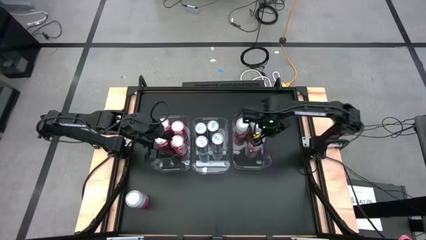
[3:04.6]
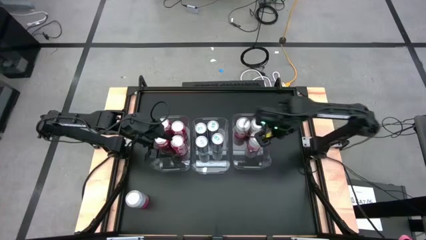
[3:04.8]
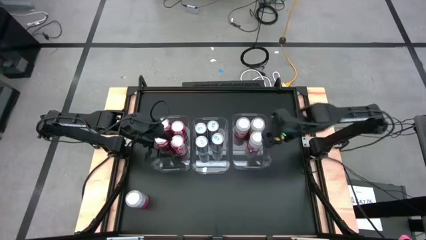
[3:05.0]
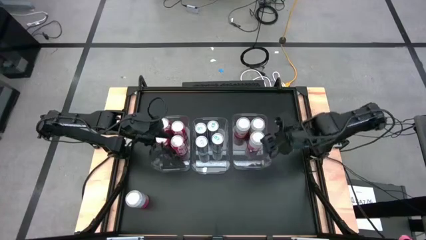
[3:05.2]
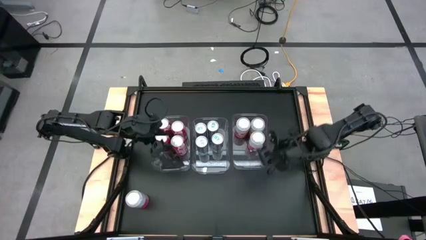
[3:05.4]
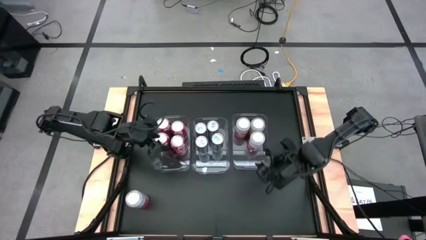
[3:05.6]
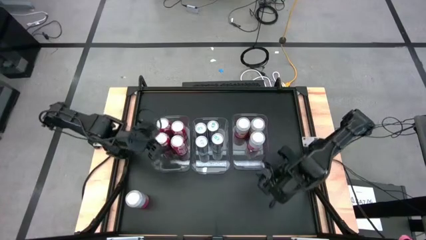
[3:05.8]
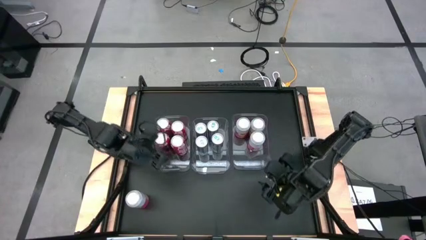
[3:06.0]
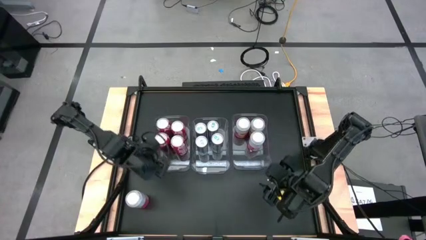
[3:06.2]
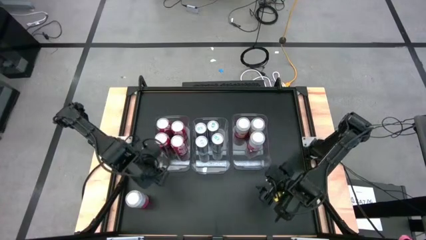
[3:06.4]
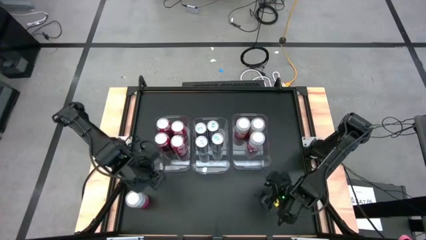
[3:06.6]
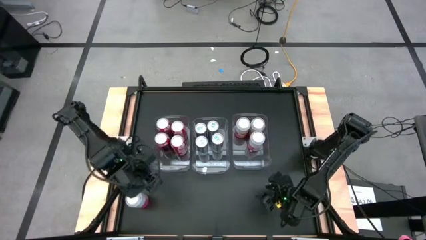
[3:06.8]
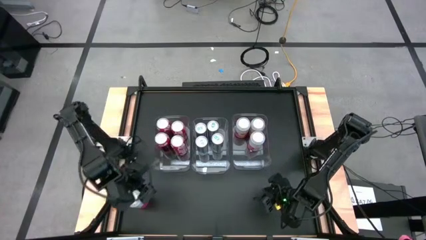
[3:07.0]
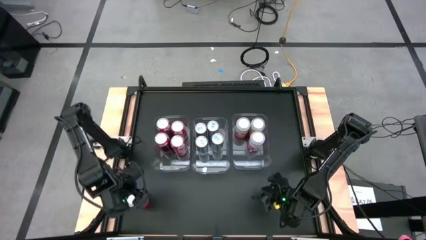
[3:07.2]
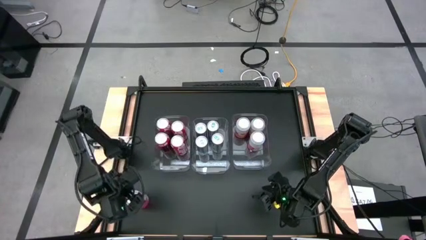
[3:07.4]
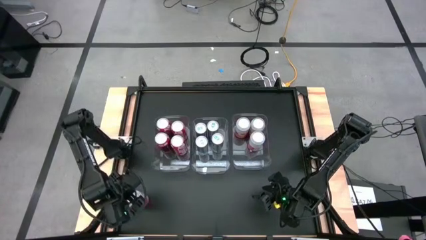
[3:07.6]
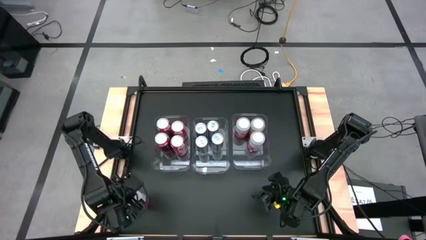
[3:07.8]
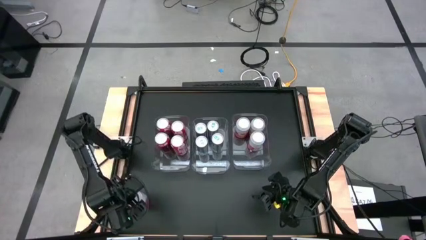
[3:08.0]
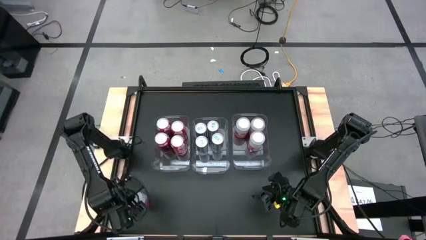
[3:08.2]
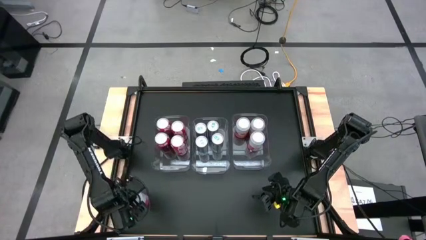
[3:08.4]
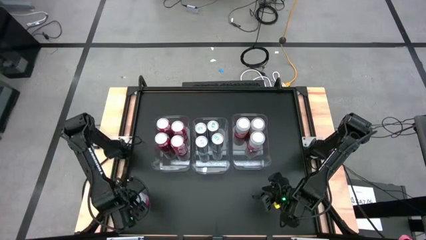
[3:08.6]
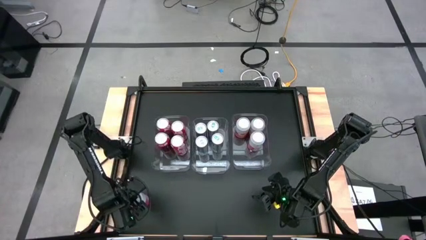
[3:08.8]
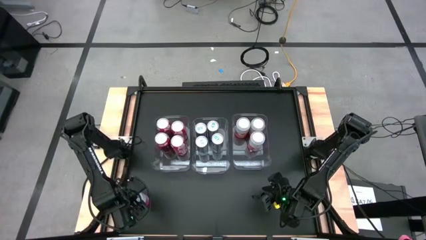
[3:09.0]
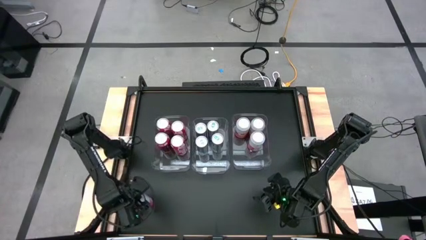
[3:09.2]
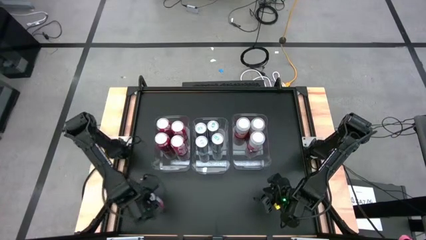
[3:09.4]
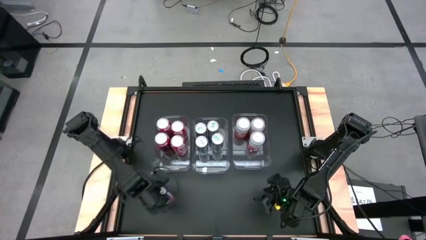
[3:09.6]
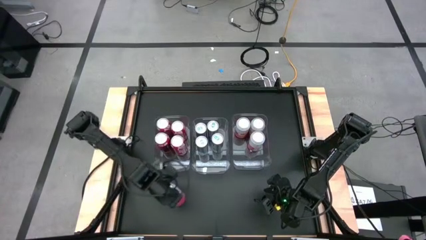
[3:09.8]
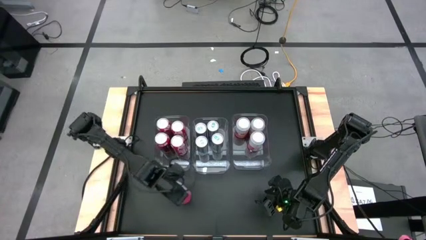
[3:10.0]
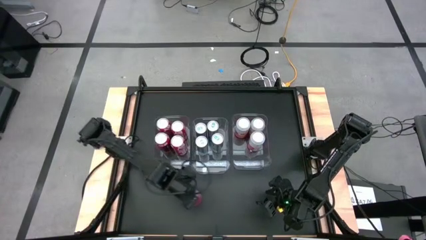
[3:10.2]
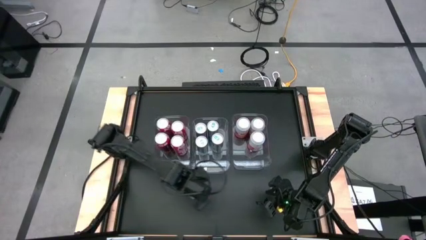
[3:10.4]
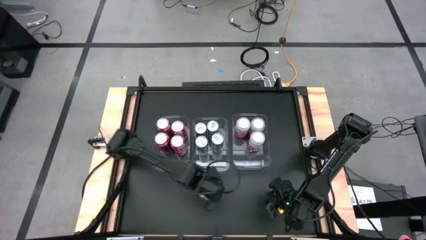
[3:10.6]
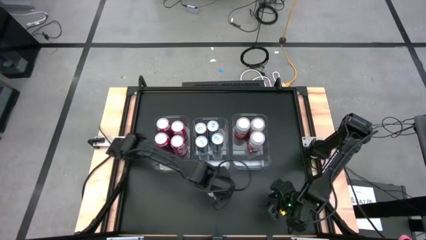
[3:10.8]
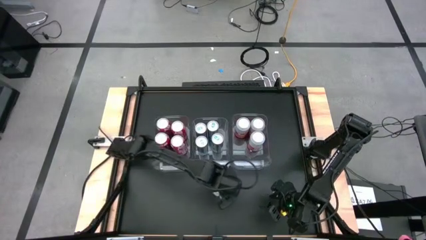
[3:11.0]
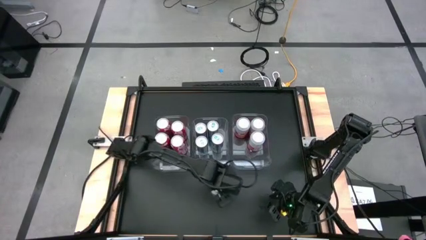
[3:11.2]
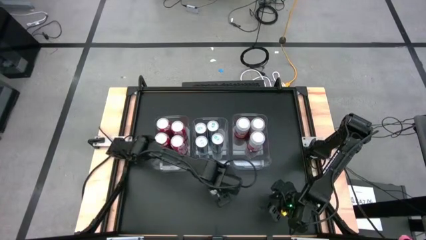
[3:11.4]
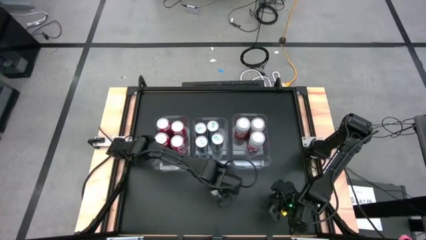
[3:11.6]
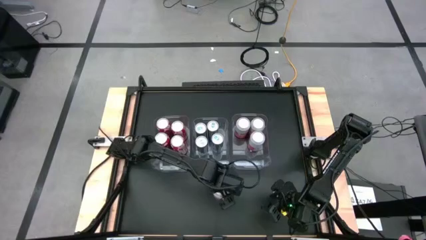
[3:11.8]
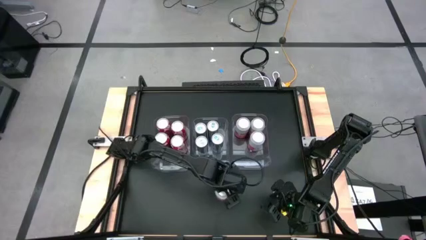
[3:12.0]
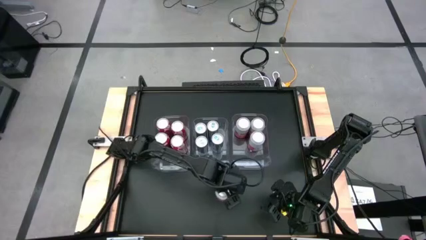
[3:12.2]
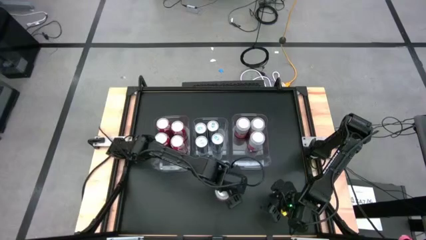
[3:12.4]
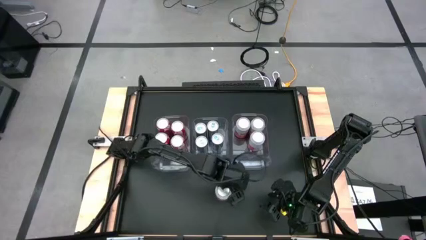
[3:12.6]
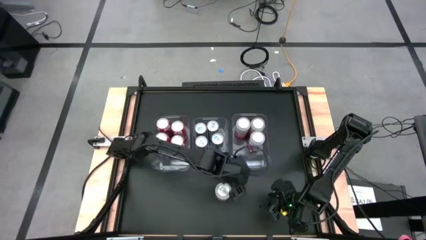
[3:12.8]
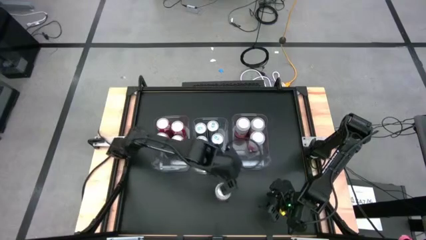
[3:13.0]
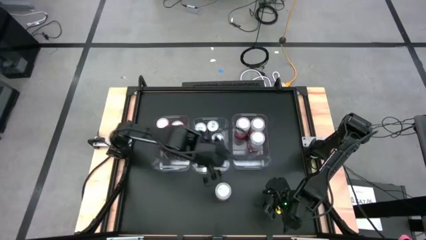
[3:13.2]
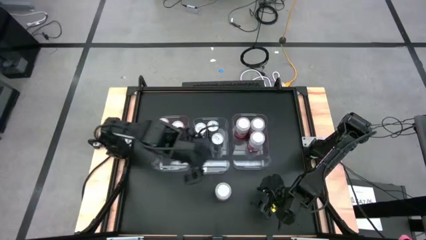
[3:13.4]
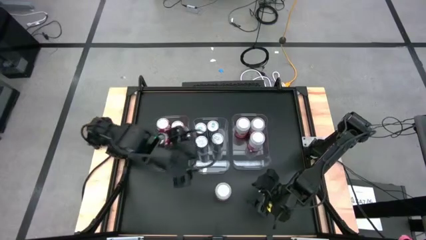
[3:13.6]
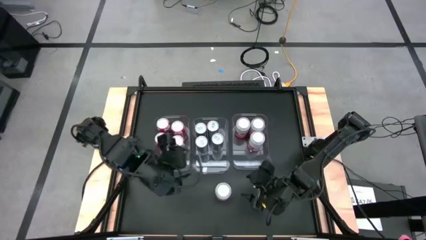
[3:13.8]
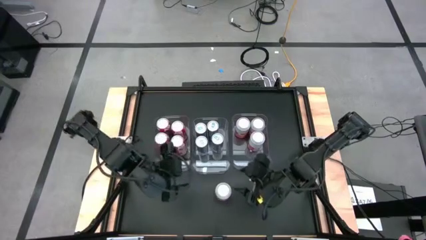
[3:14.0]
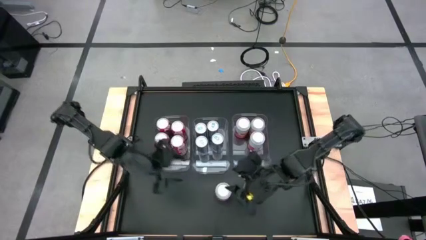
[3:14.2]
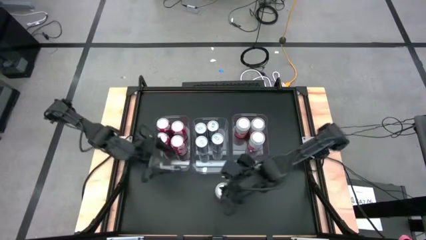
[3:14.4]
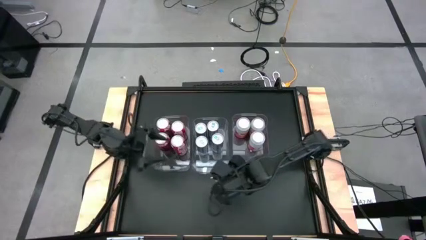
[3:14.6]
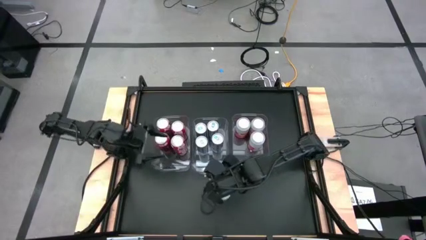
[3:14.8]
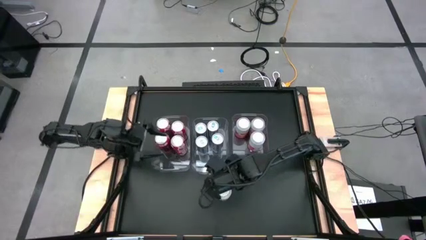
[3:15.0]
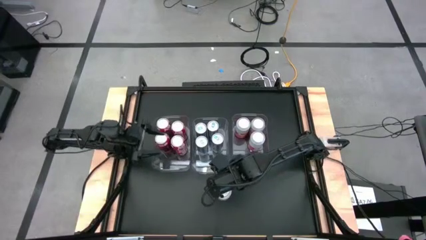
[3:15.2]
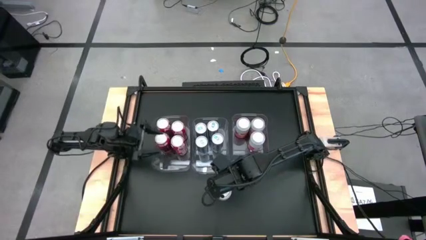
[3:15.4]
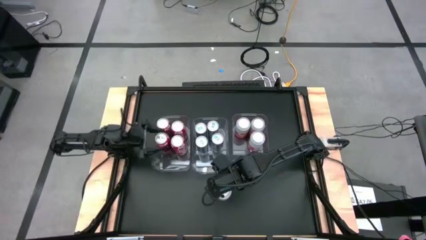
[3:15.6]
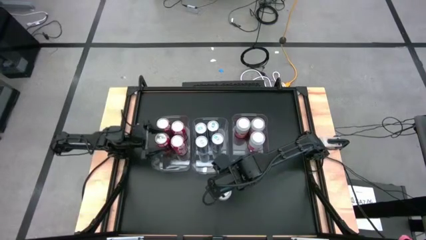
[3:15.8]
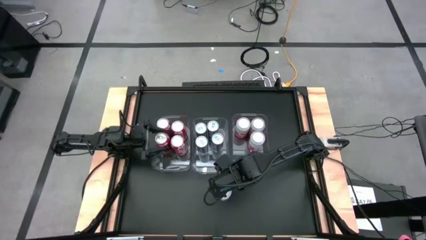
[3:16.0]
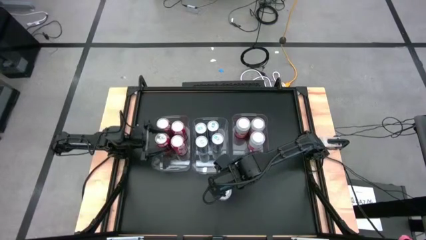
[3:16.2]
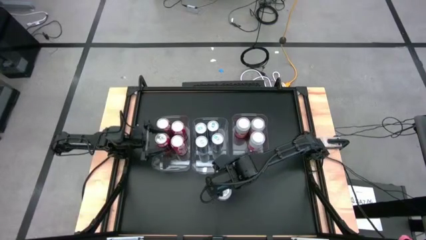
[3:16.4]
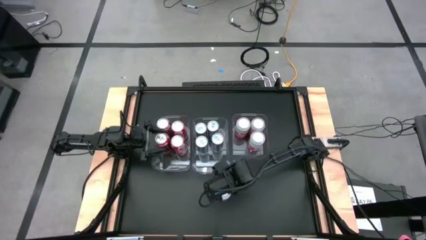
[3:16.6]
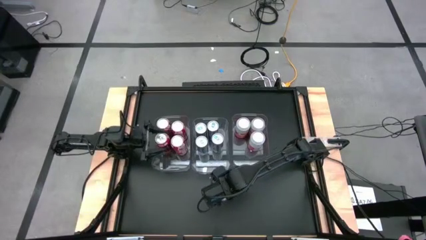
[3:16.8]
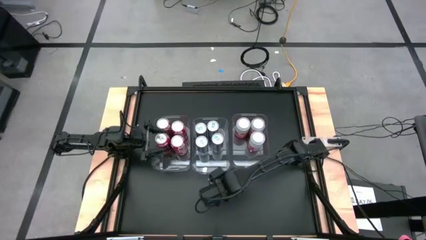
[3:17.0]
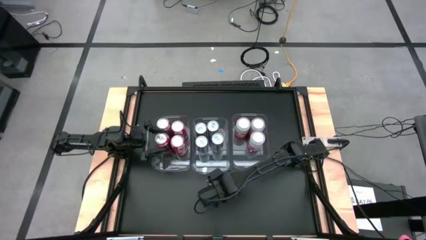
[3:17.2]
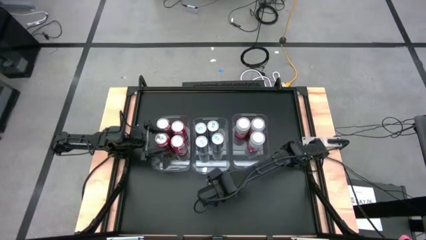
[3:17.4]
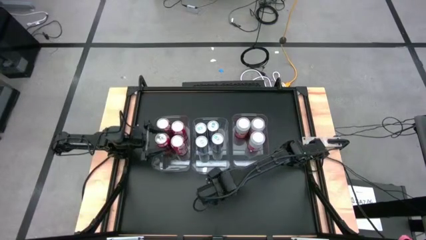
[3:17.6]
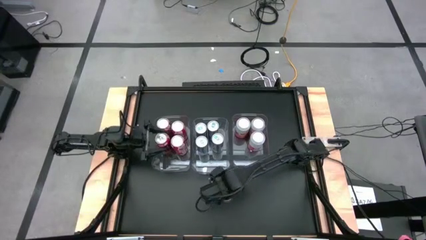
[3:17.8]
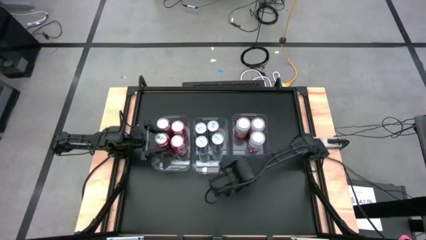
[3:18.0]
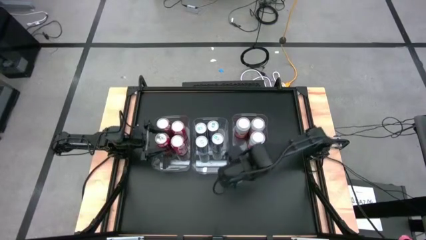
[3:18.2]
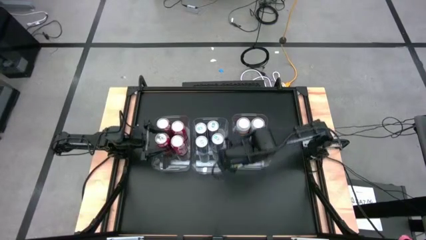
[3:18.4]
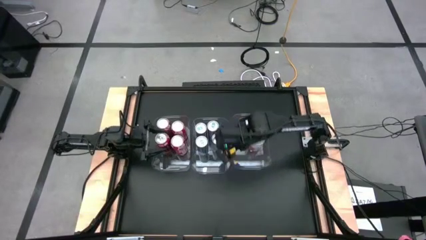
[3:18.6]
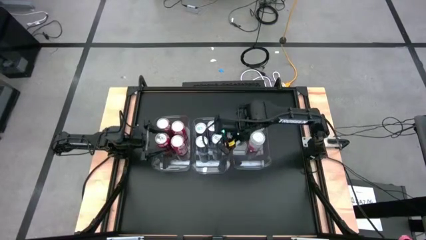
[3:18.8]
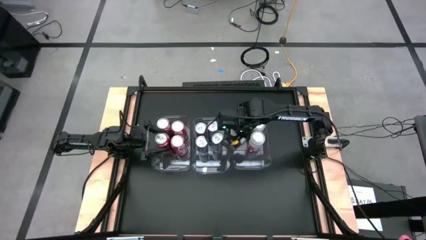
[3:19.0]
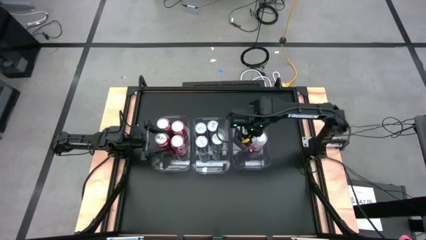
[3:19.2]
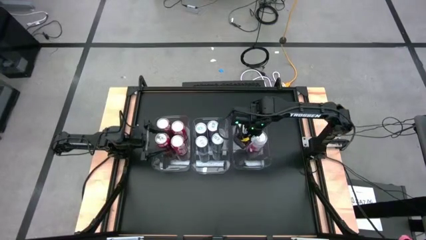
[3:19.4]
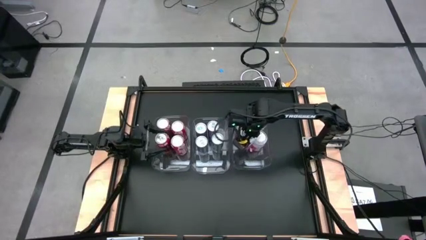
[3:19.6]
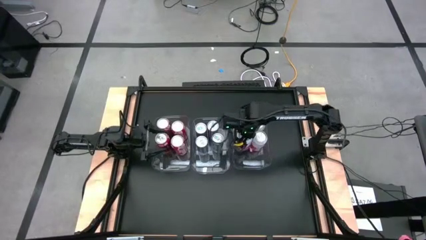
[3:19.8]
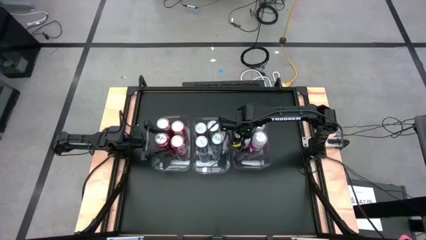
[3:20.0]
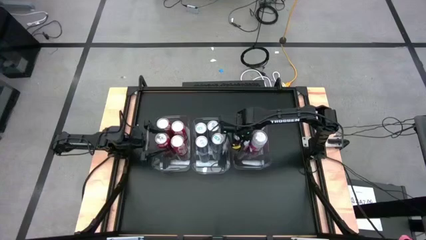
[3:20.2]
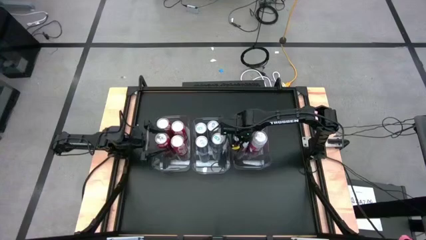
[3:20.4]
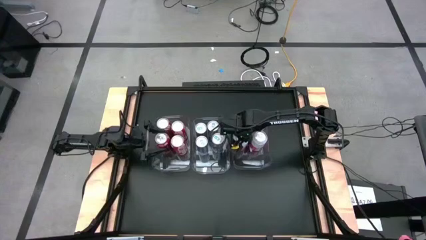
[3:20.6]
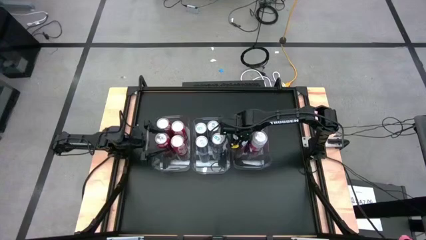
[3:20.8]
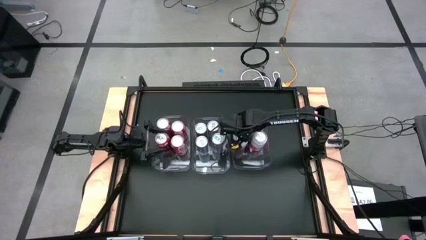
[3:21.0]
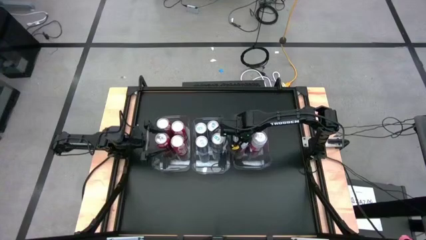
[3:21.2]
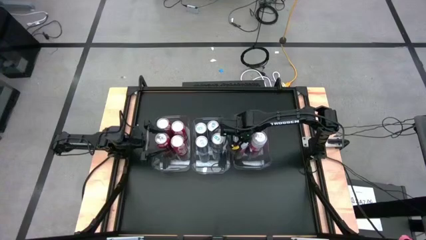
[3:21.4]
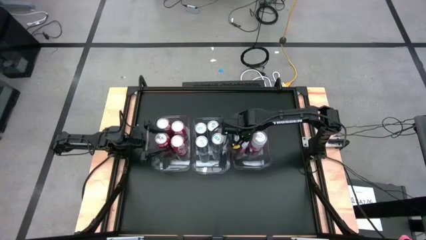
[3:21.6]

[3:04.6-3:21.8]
Task: Sort soda cans
Put the pink-white soda can to the right transparent bin
